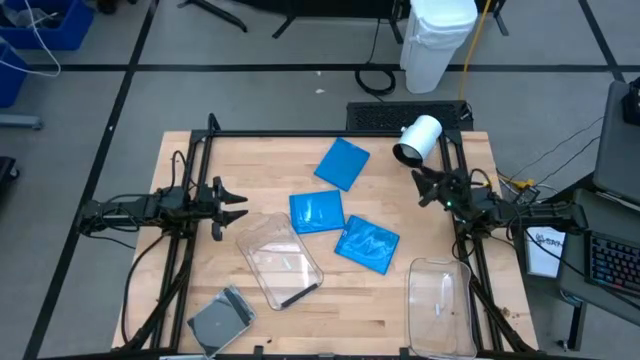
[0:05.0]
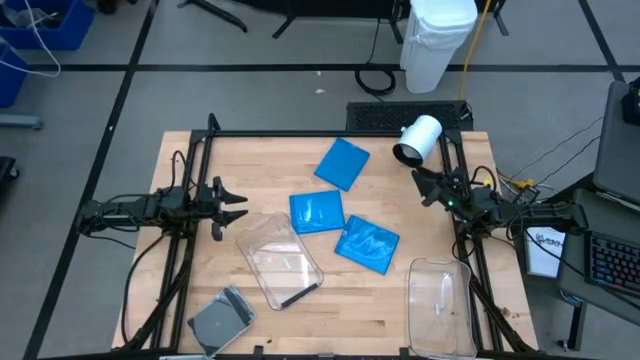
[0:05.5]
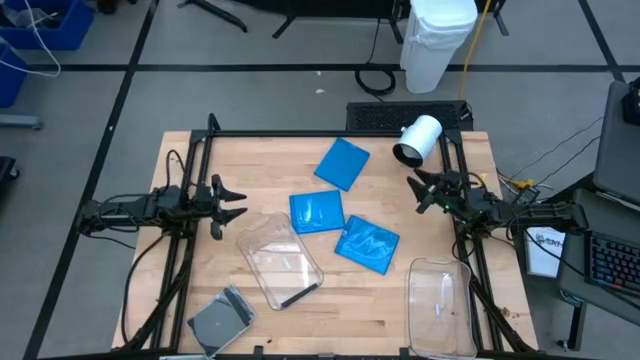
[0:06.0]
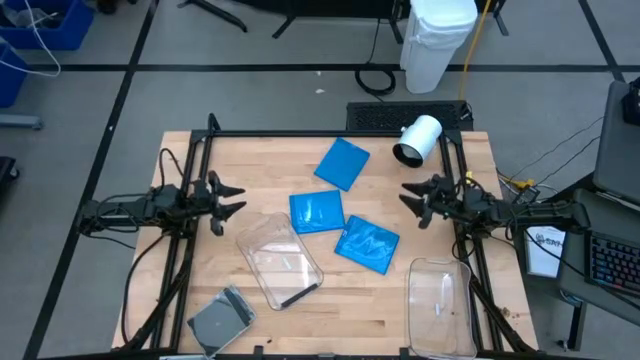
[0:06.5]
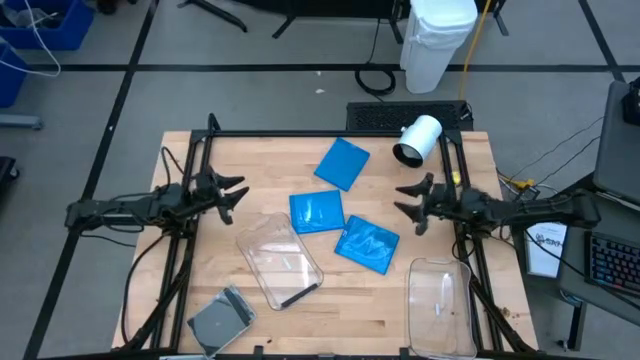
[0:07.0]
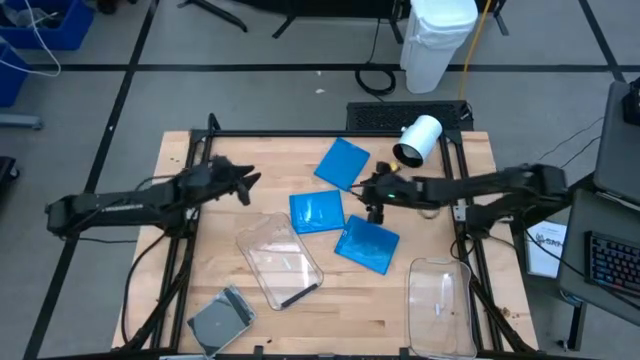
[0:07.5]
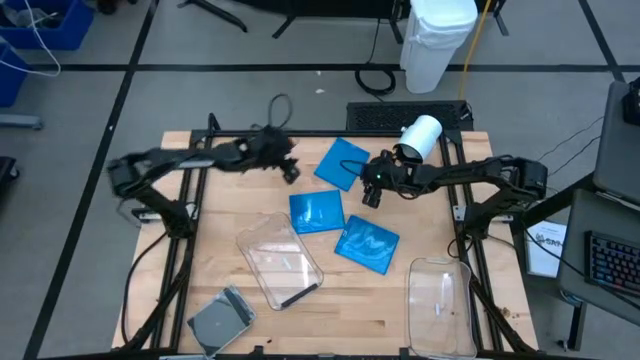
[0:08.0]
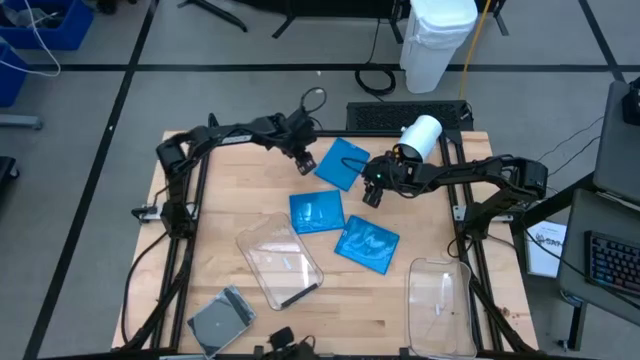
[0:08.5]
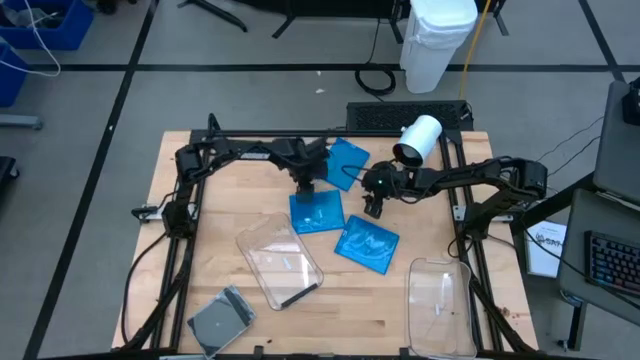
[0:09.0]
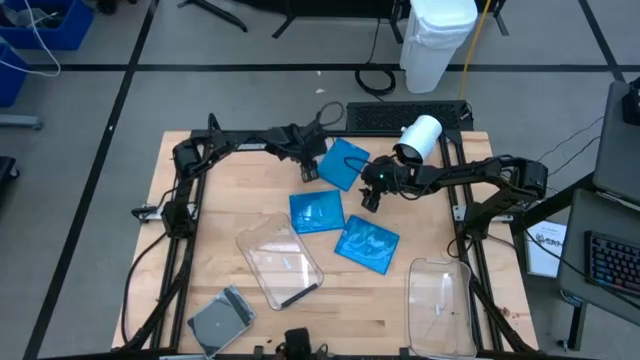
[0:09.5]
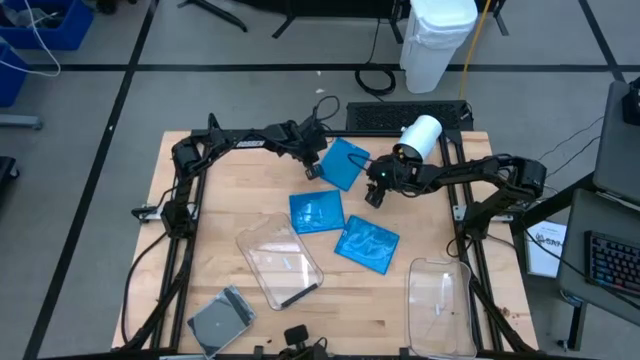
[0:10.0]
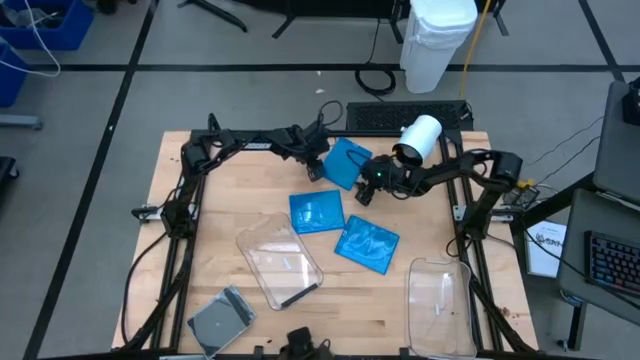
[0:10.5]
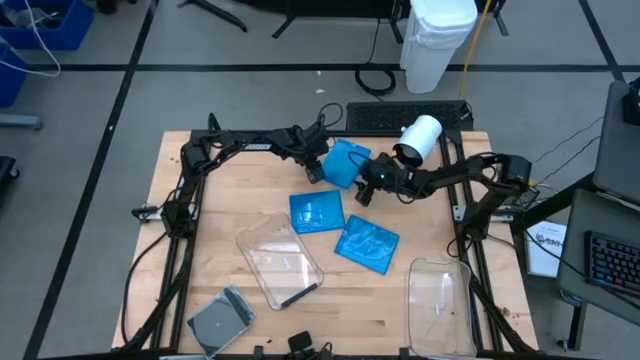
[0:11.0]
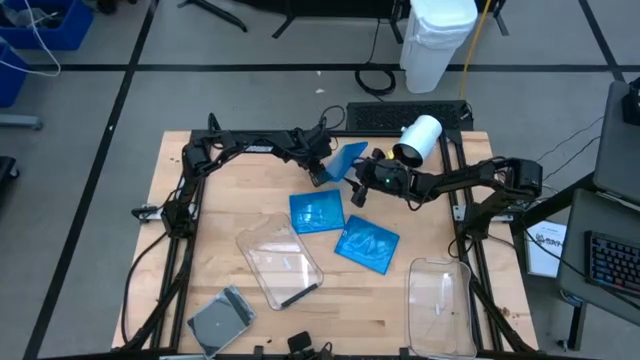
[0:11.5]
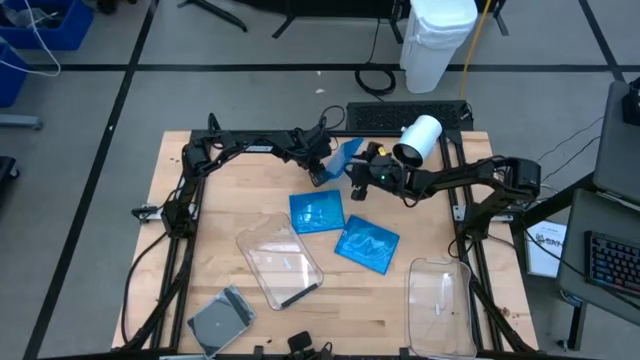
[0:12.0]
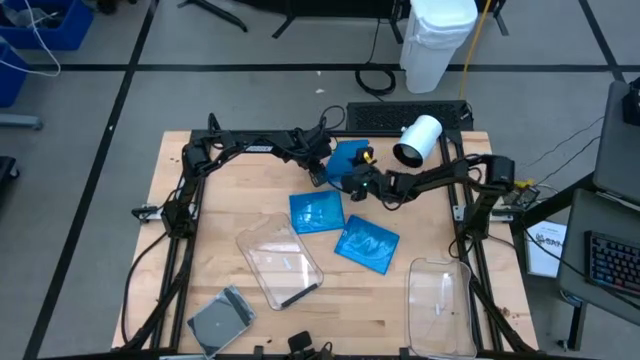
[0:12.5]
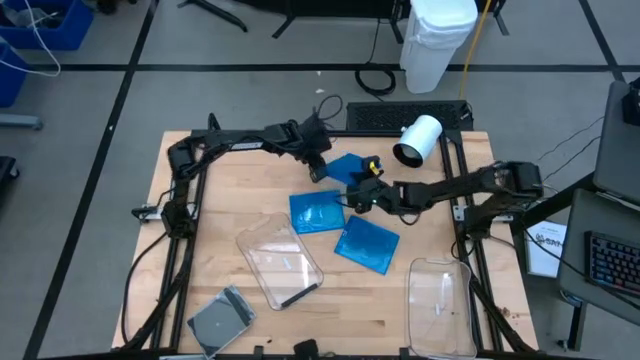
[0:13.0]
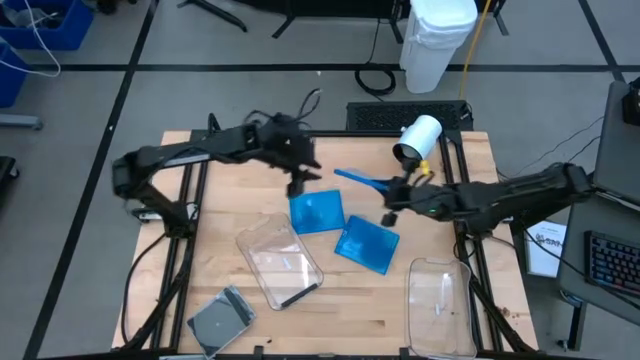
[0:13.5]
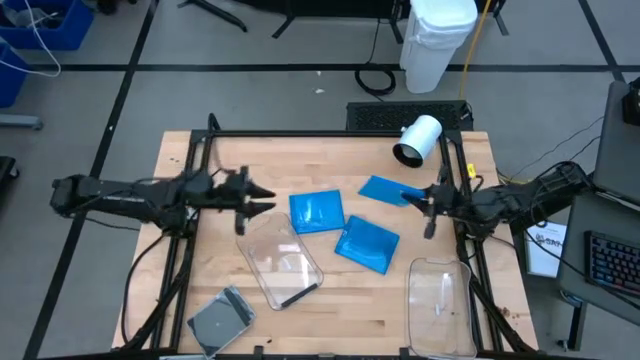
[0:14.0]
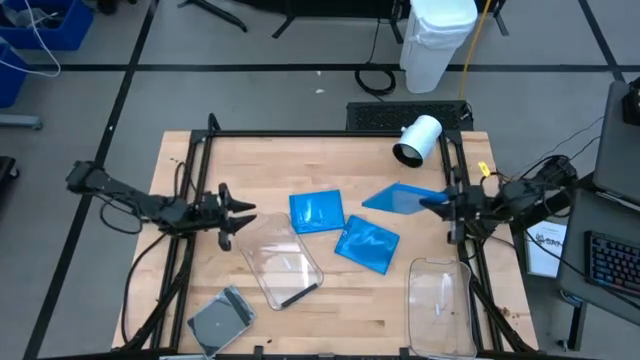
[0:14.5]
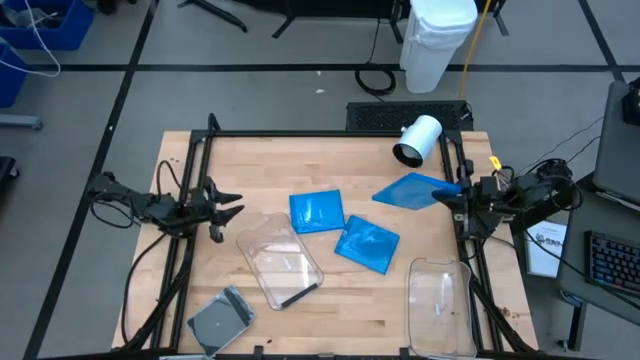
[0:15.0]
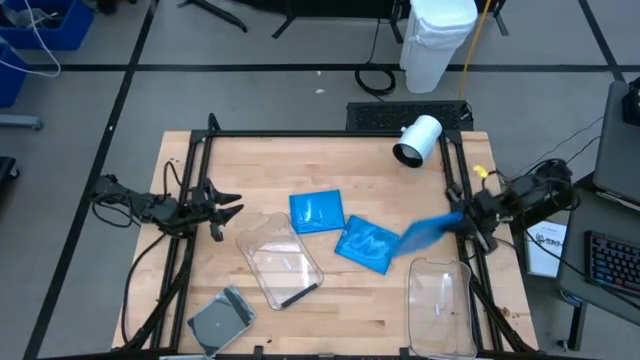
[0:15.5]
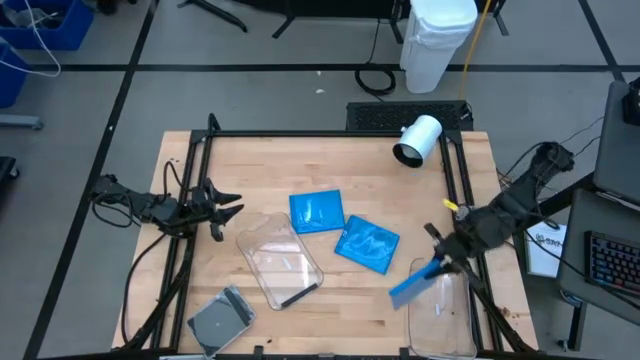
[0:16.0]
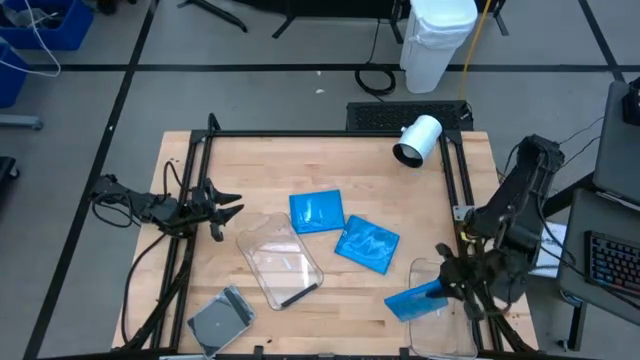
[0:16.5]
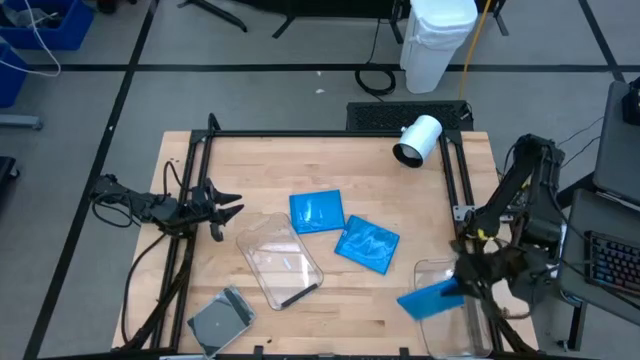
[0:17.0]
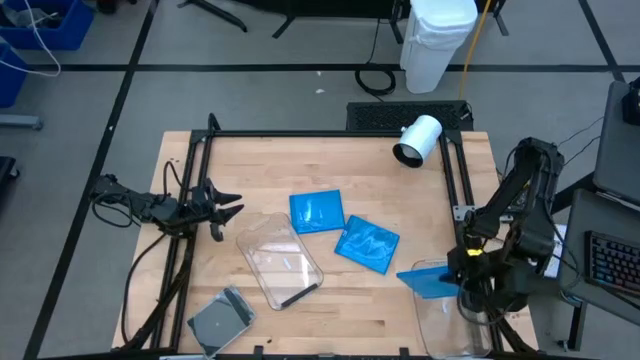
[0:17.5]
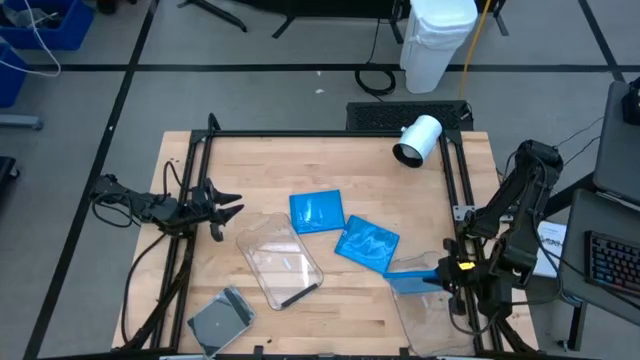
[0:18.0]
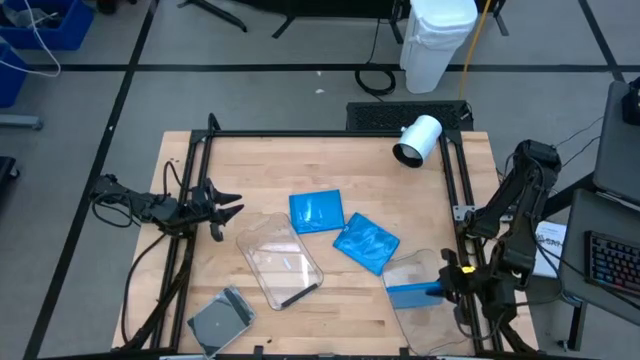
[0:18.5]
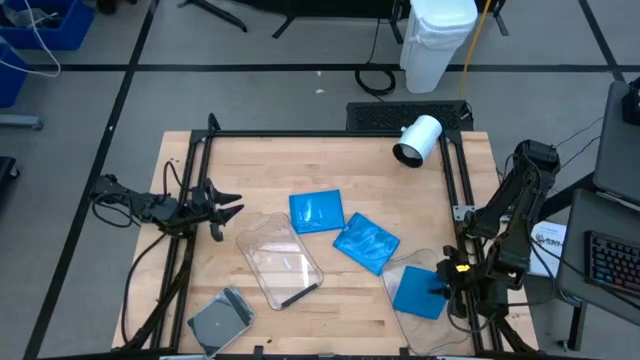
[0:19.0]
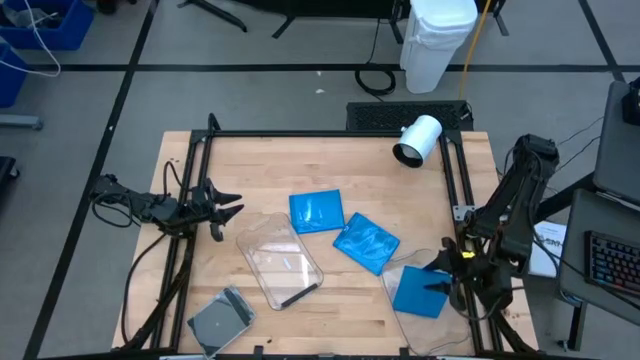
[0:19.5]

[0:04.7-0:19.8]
Task: Pick & place jewel cases by type
Put the top blue disc case into the right transparent bin

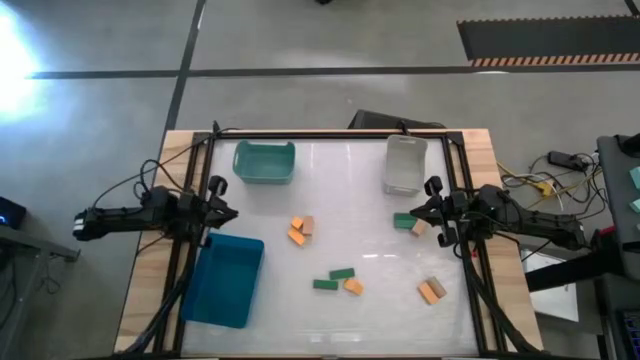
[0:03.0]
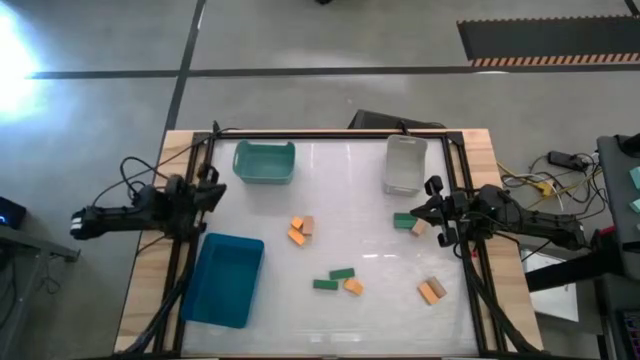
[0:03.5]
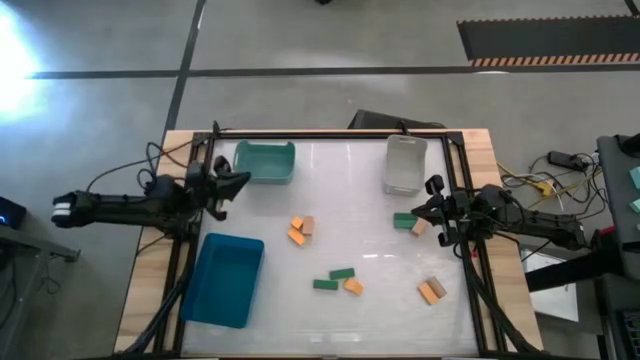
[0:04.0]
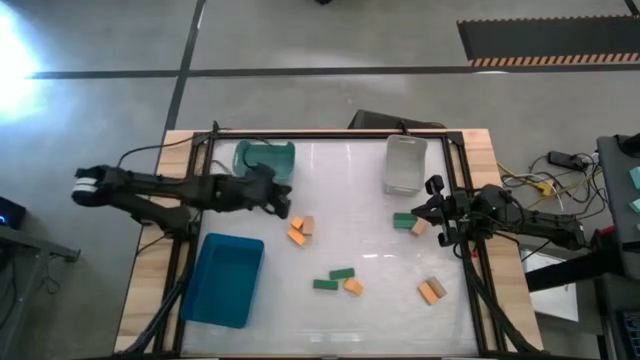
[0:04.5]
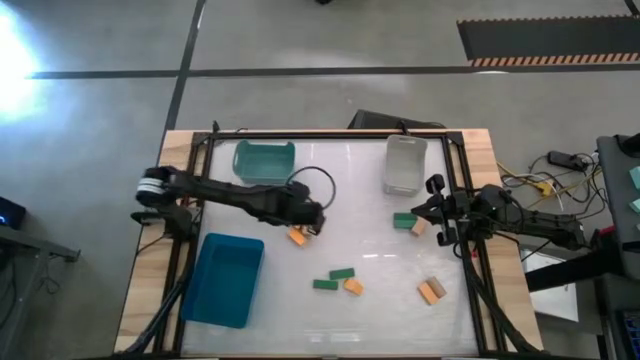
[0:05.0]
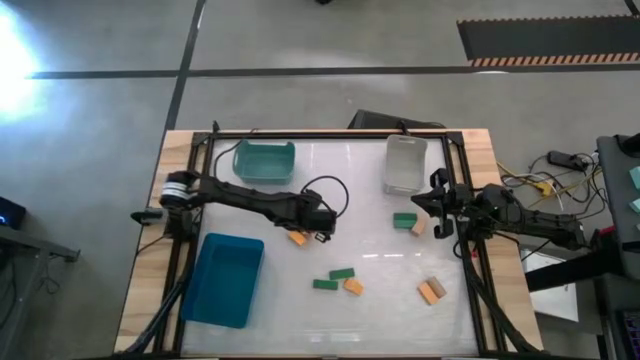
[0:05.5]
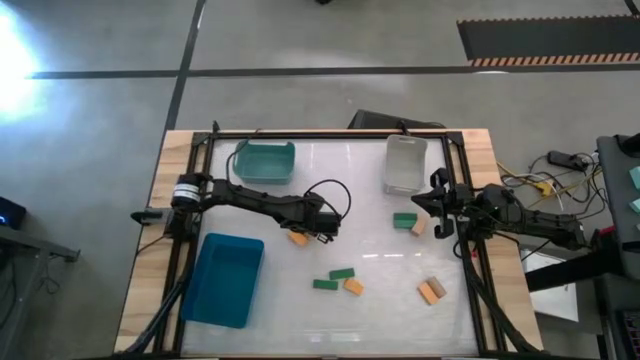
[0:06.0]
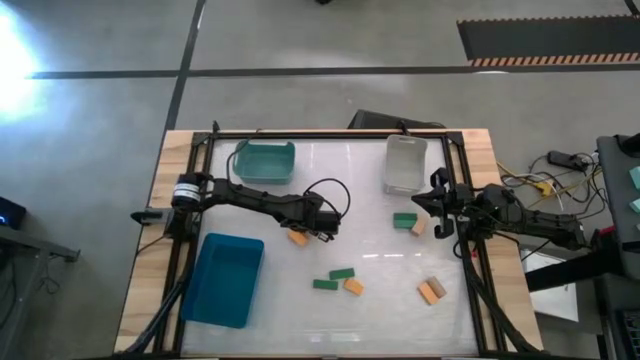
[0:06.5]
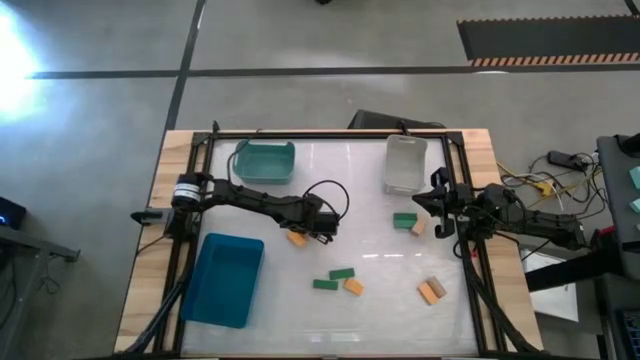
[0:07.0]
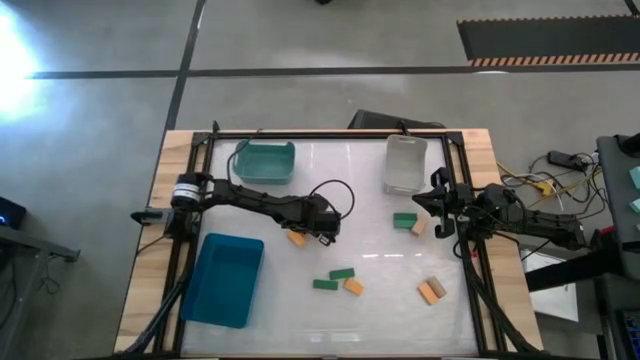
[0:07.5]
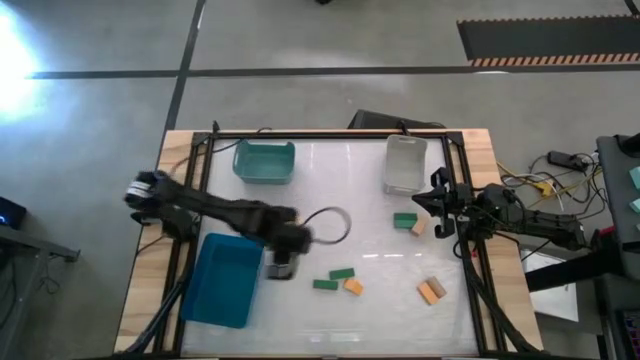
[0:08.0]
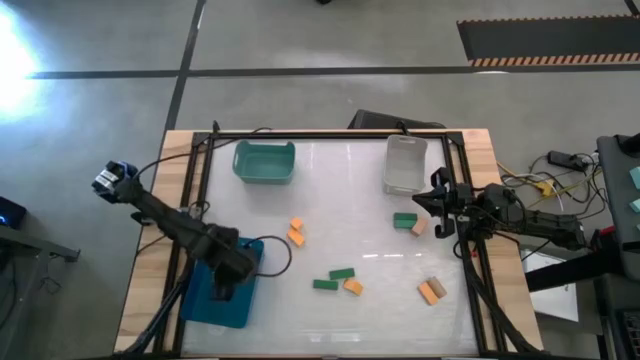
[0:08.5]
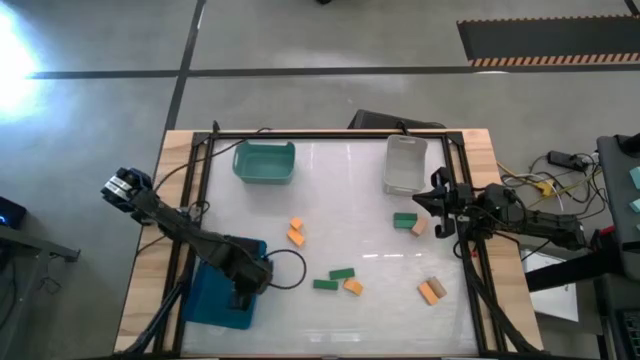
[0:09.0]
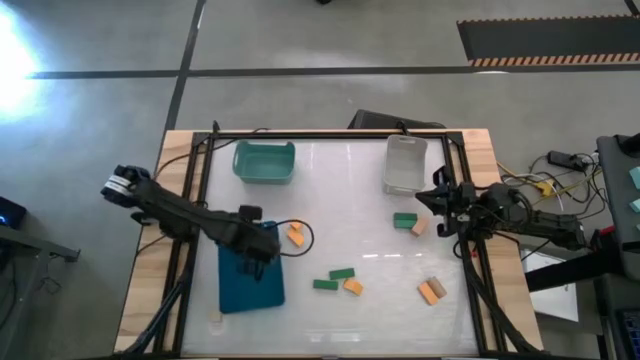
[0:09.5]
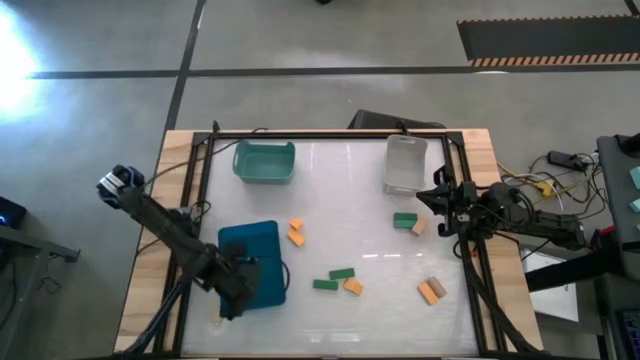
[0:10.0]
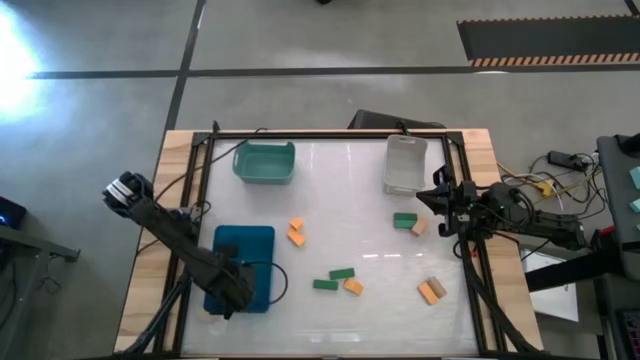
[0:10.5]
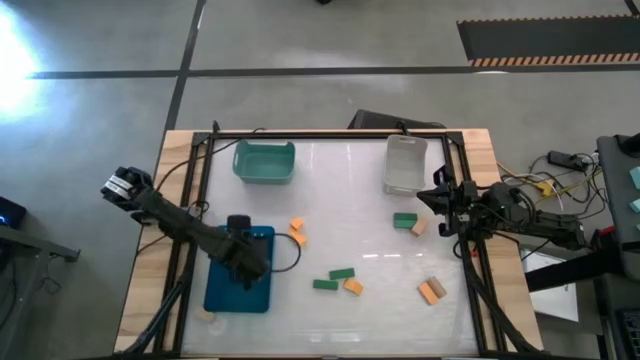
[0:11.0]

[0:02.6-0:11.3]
Task: Sort & place blocks by color
Put the light brown block into the blue bin
